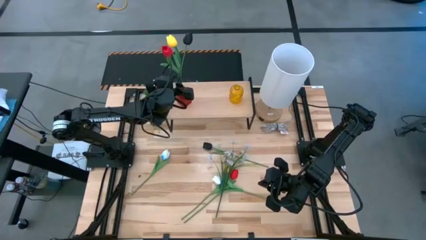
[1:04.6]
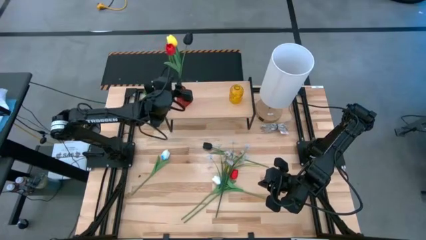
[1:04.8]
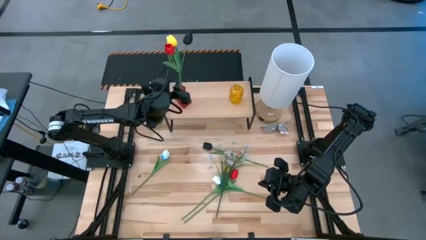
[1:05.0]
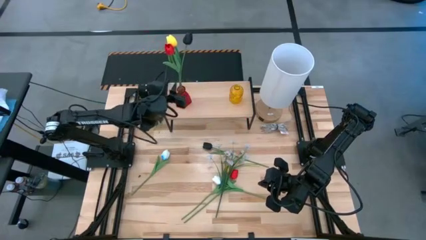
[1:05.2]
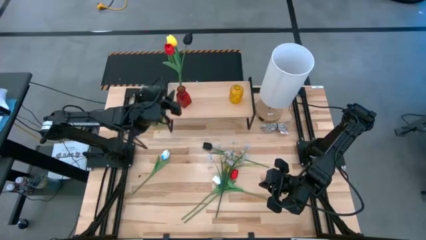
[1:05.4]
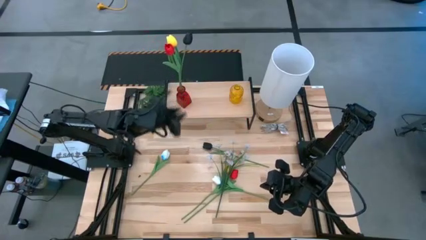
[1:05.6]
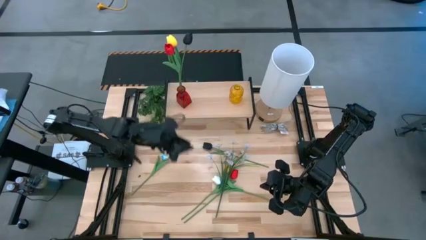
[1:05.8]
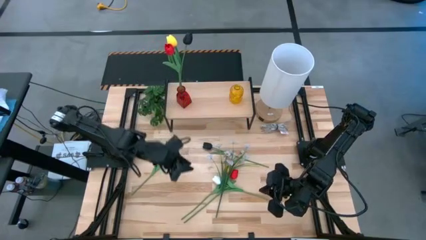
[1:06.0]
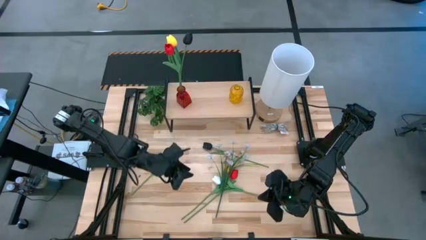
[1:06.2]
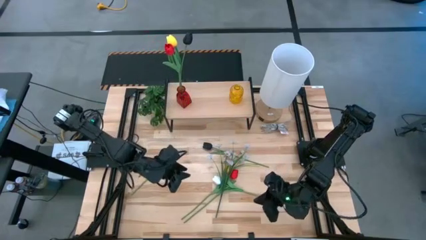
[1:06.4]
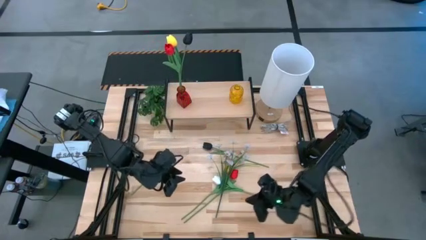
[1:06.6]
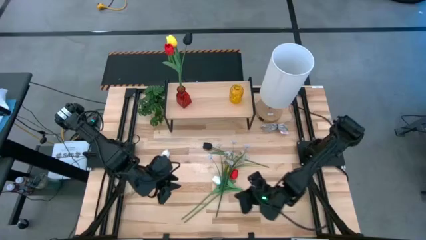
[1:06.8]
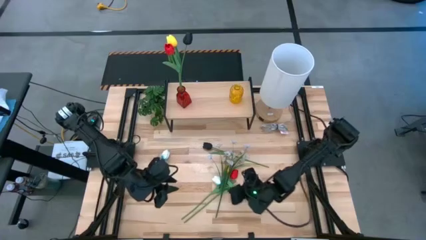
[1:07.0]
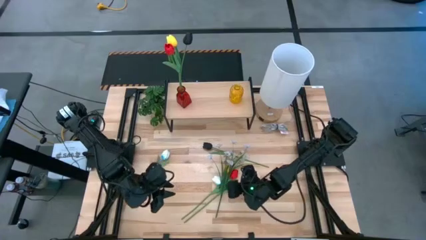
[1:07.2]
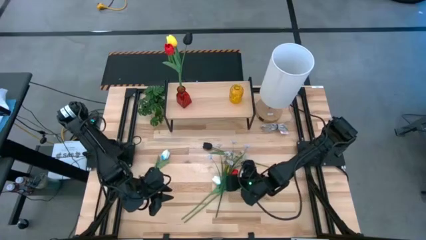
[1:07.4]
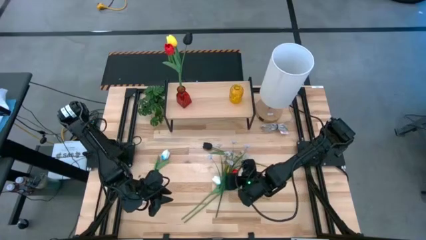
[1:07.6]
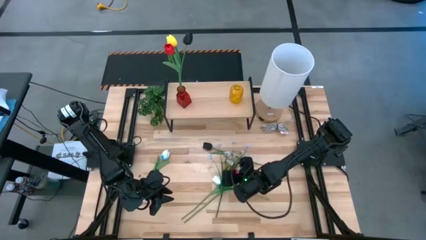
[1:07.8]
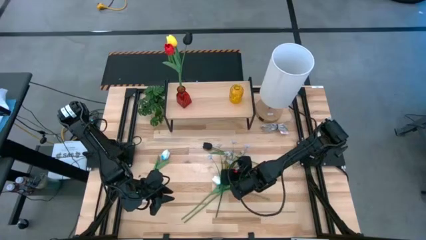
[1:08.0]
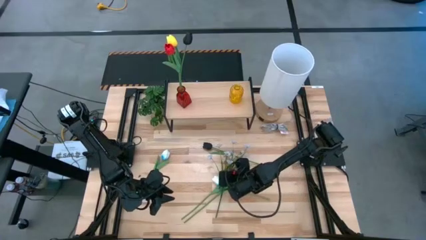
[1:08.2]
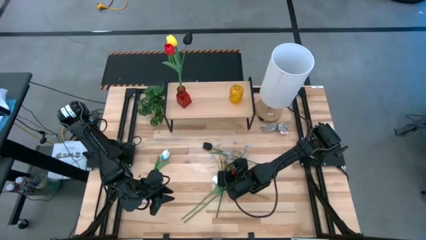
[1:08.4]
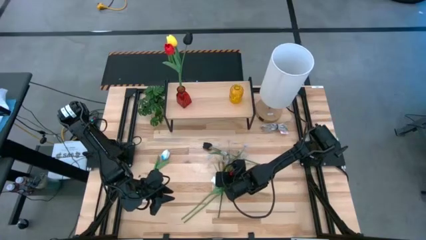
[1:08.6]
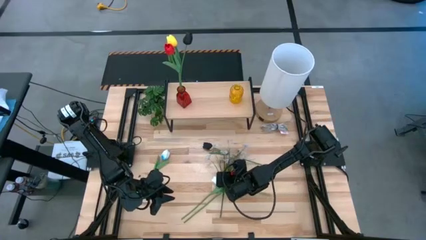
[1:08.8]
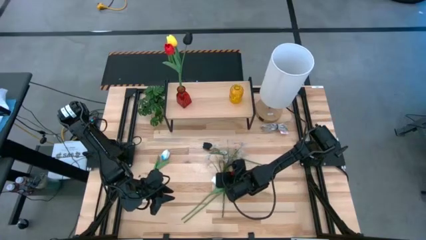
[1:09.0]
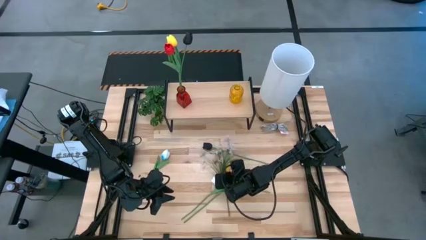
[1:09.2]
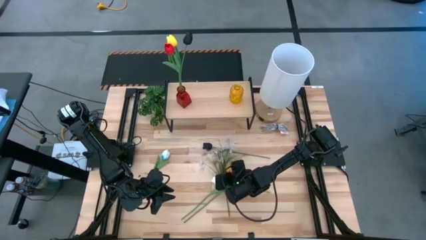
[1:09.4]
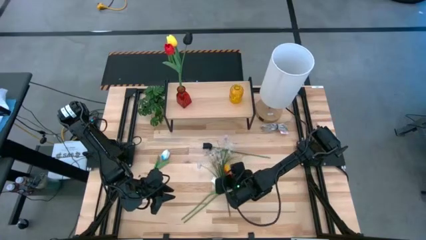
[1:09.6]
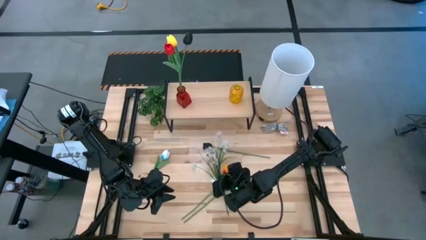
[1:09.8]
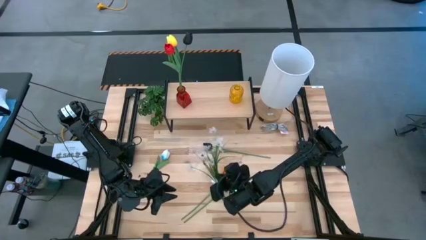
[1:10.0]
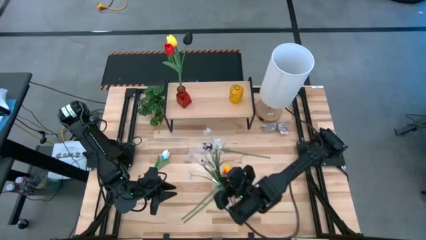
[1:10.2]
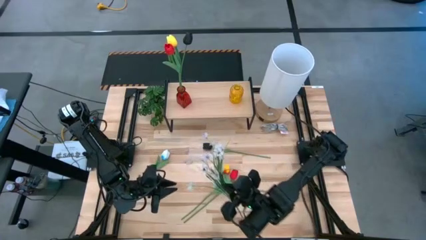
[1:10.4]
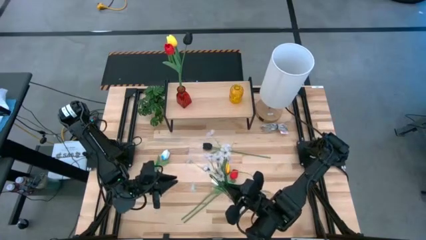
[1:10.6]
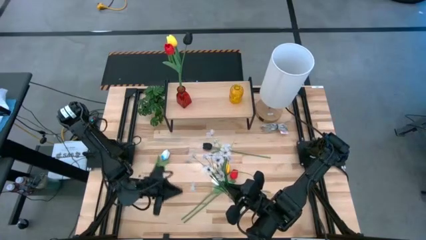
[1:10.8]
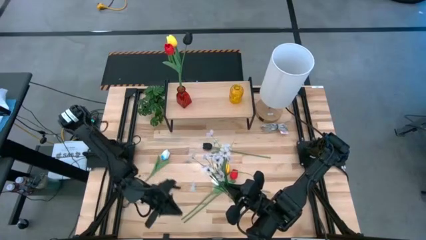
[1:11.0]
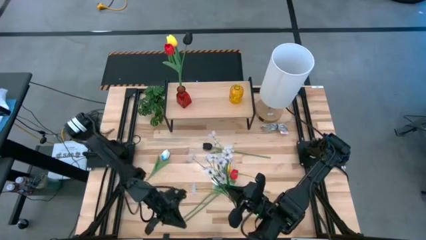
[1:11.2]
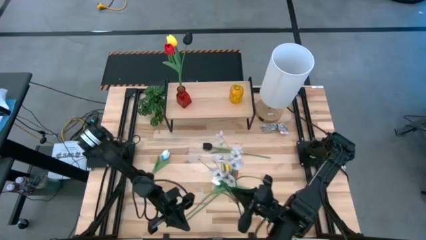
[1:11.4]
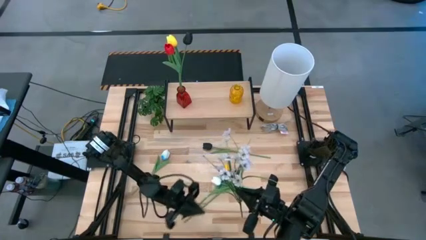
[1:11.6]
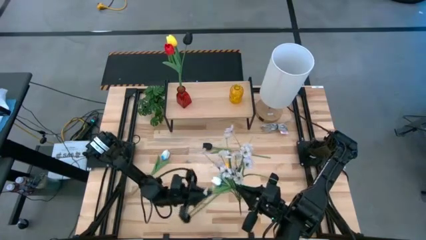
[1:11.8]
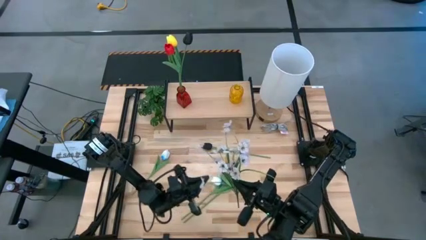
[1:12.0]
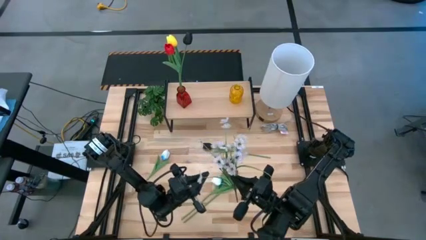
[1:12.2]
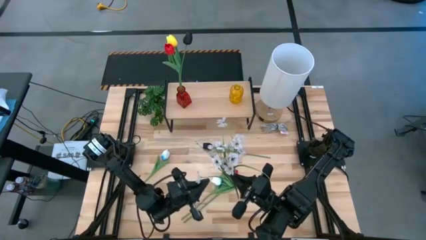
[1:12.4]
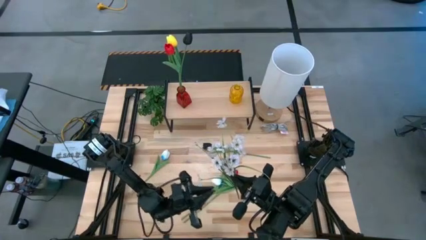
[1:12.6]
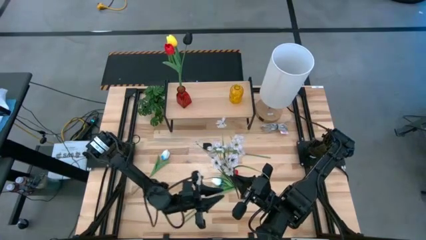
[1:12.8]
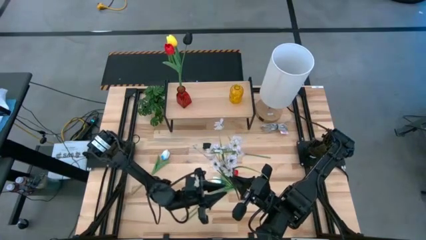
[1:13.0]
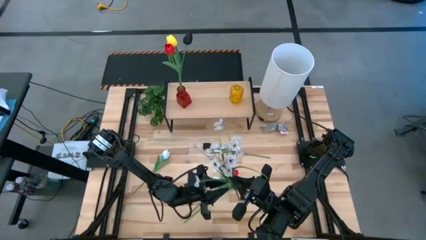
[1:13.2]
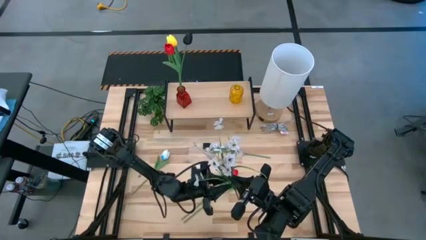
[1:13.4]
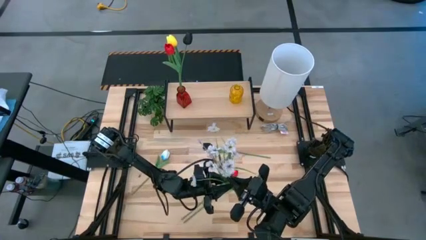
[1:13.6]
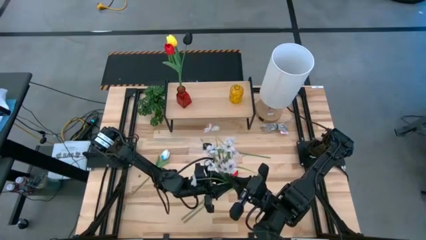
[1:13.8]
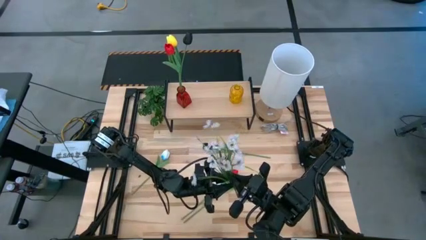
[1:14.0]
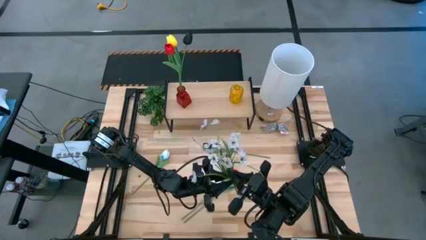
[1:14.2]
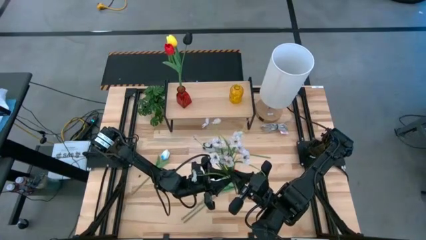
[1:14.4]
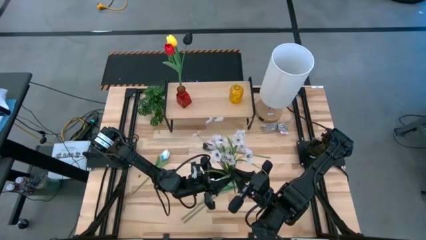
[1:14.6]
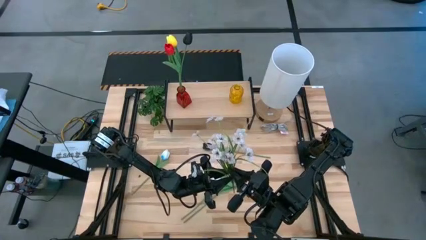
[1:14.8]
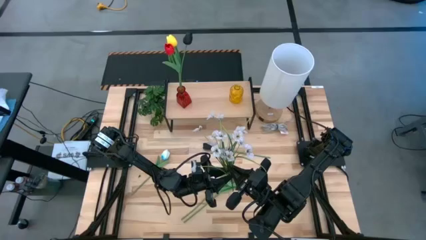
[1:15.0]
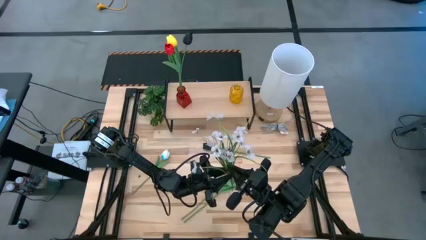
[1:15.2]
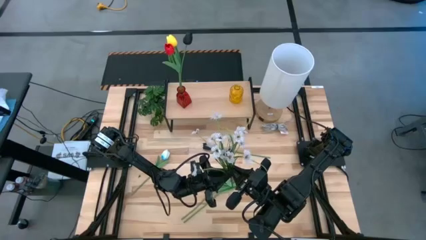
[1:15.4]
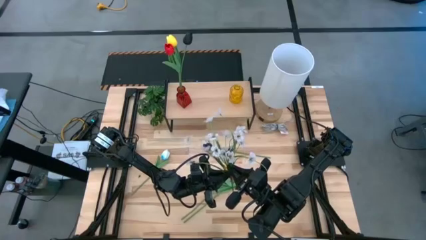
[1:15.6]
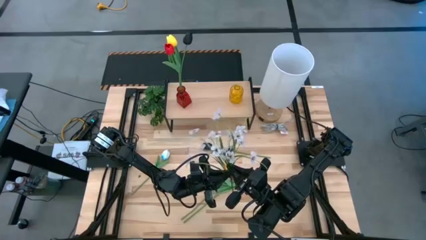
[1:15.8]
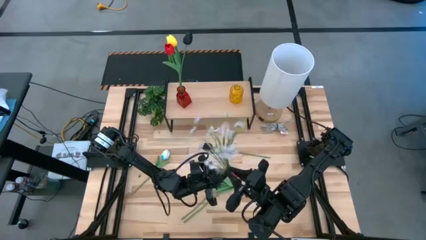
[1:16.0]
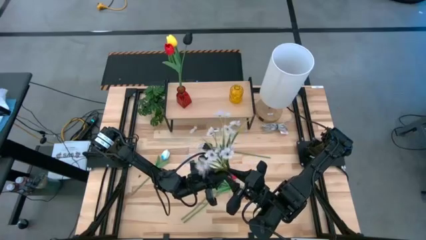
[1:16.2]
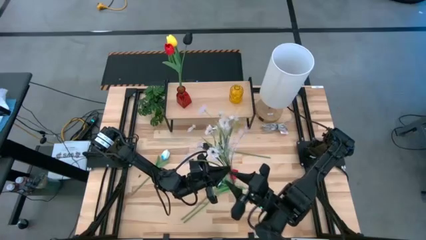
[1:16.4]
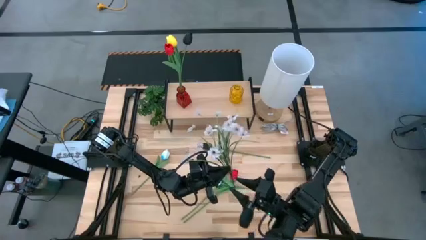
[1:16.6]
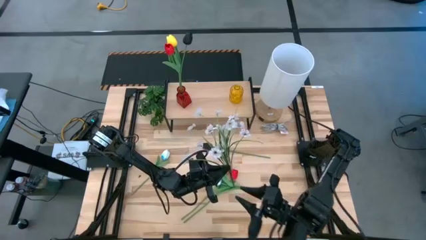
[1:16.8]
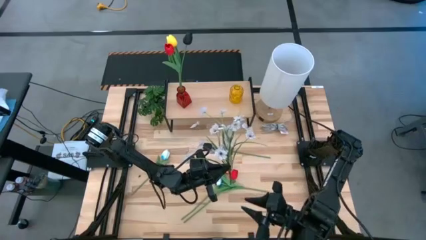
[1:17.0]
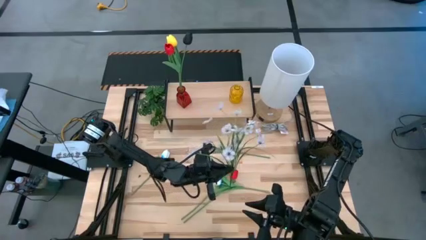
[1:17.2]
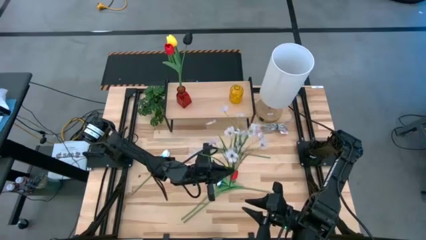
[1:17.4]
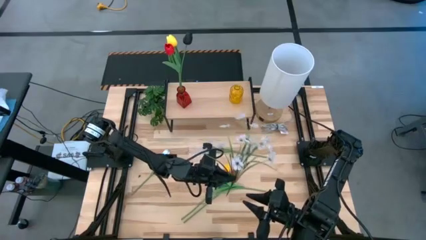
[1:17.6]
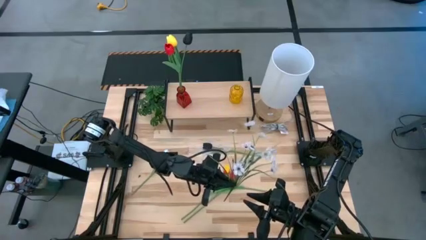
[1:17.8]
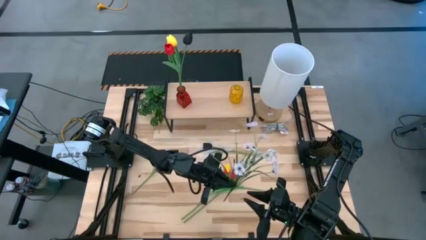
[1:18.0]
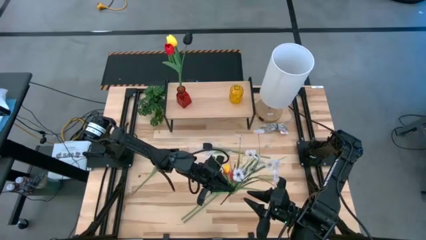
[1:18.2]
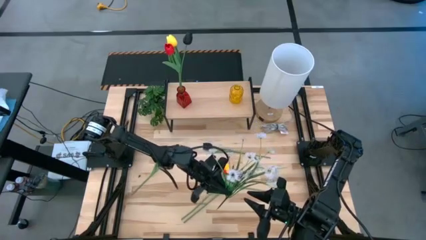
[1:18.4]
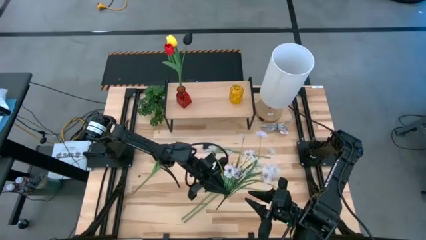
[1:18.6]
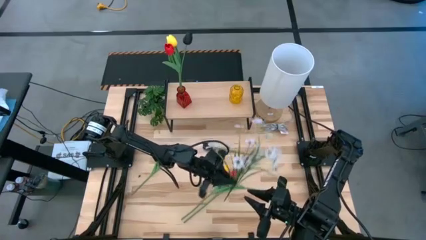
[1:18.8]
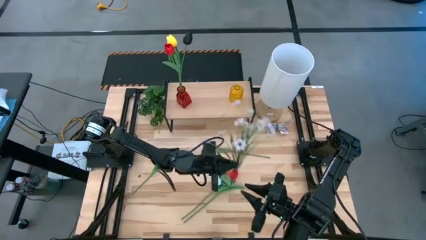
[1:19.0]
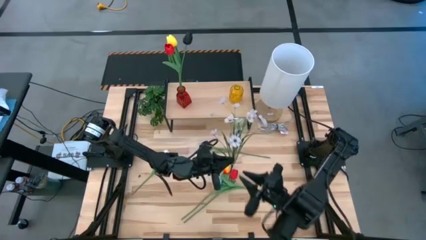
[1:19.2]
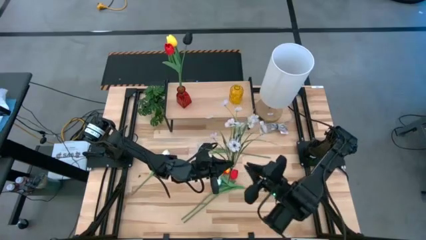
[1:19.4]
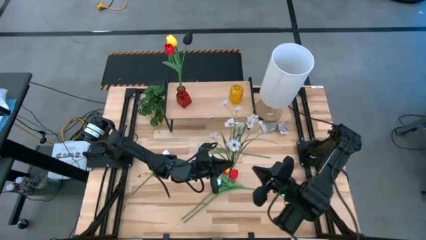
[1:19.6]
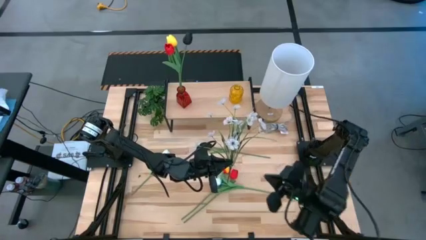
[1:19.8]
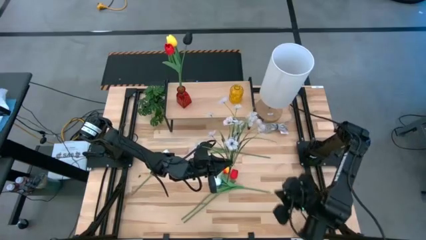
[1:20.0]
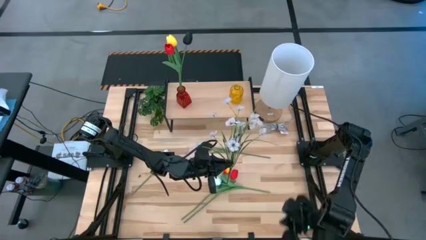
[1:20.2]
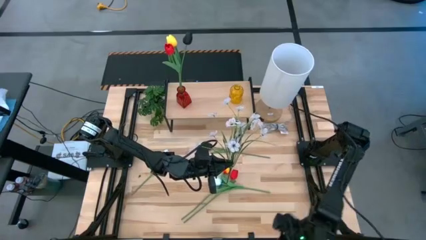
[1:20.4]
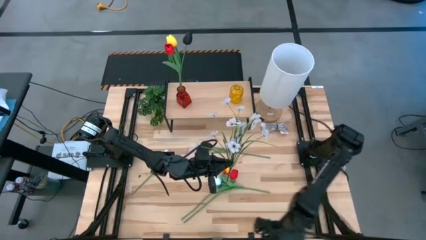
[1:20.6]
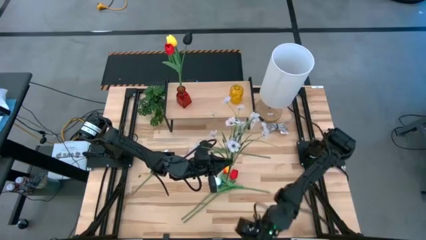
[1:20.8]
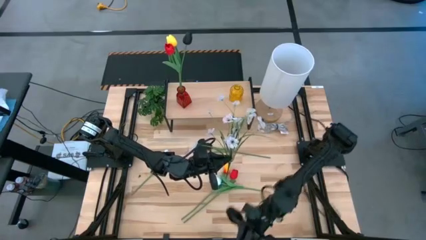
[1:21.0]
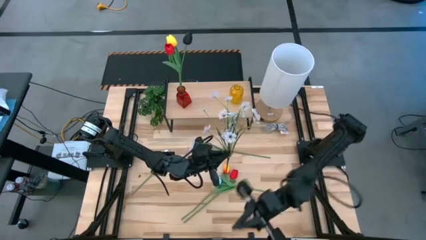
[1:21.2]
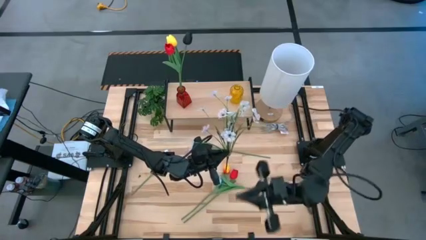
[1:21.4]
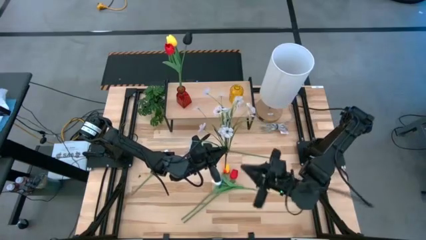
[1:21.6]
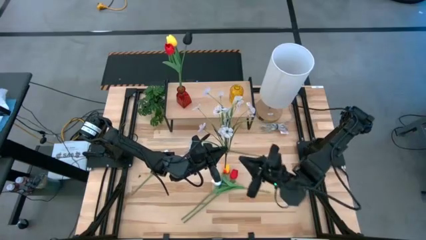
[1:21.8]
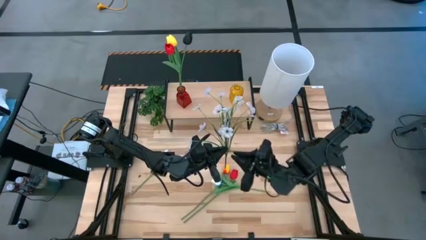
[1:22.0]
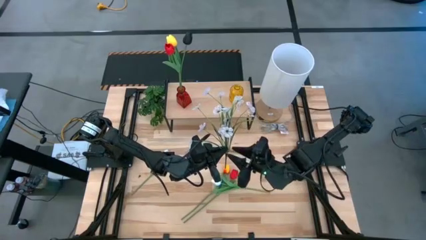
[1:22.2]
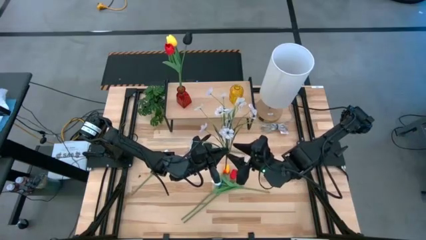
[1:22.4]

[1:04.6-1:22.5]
Task: Pick and place flowers into a vace then onto a shelf
Put the white flowers into the red vase on the shelf
